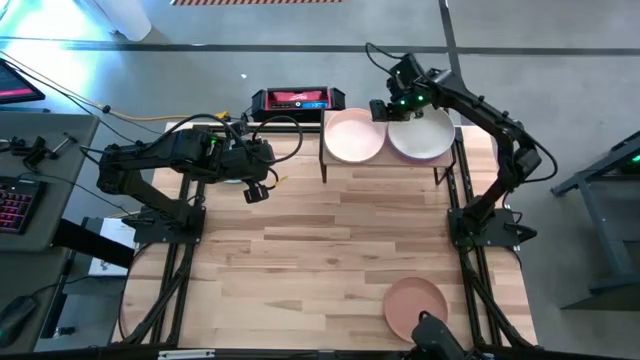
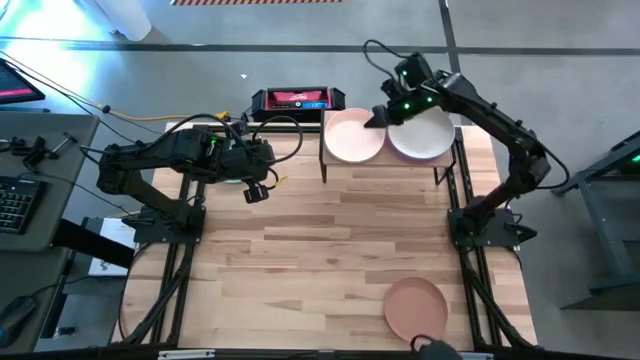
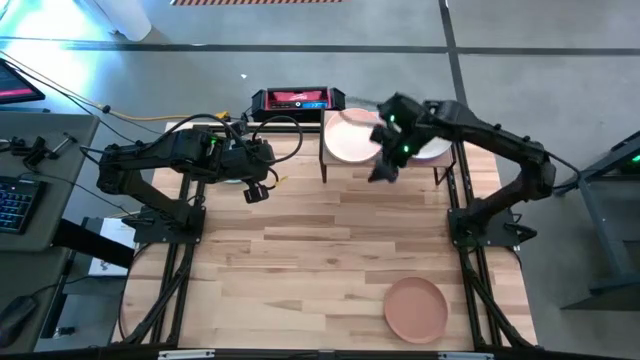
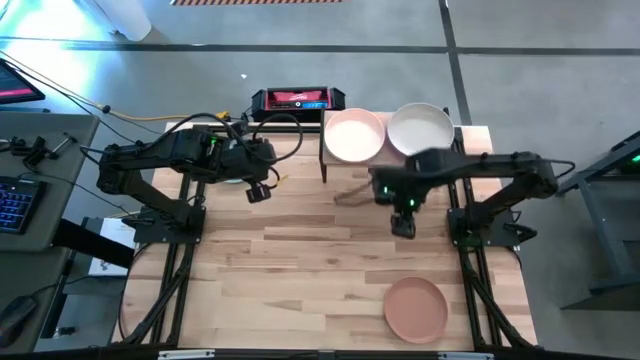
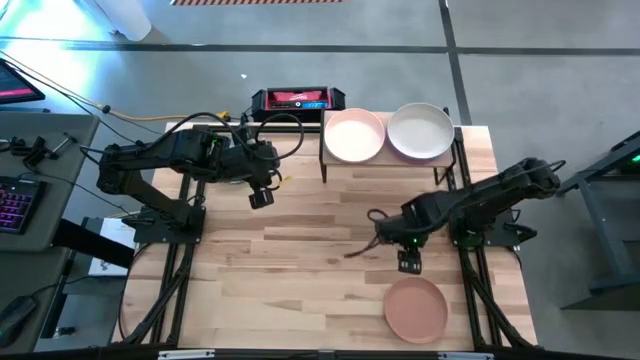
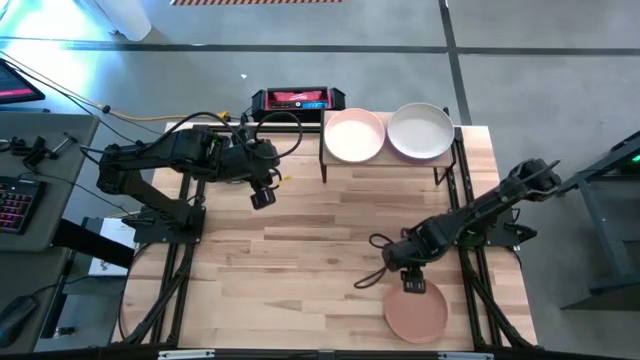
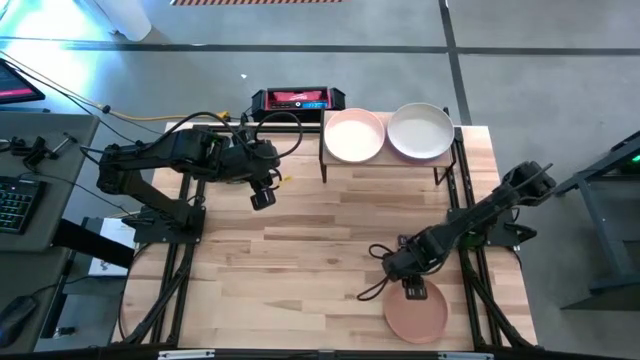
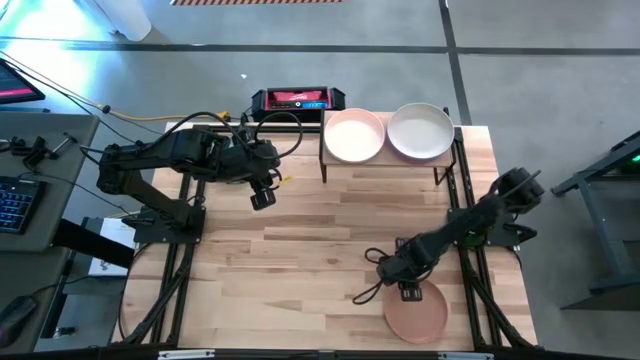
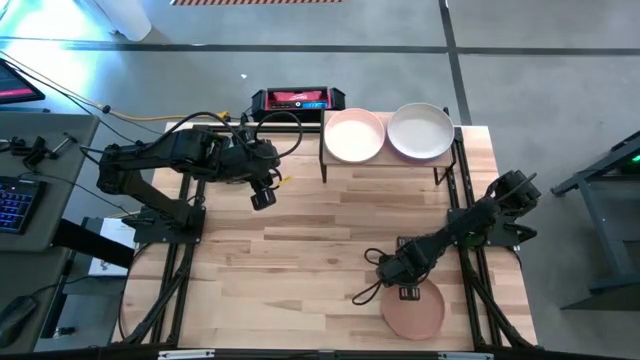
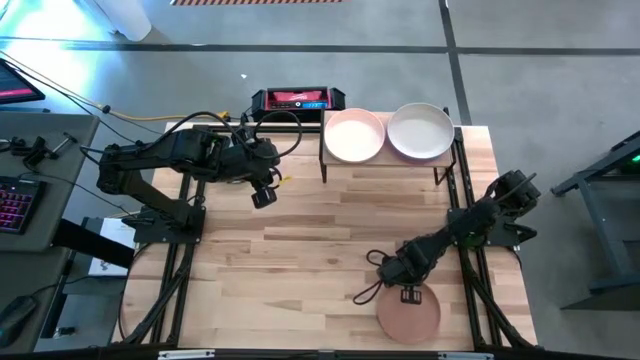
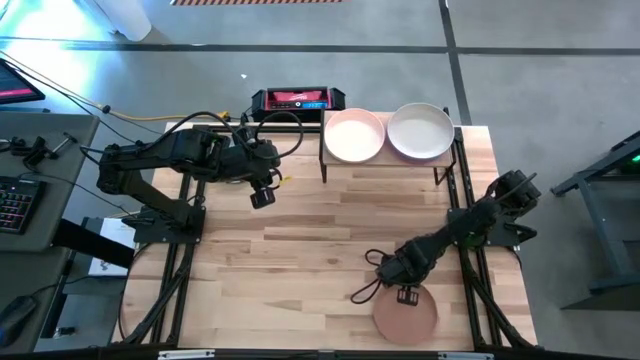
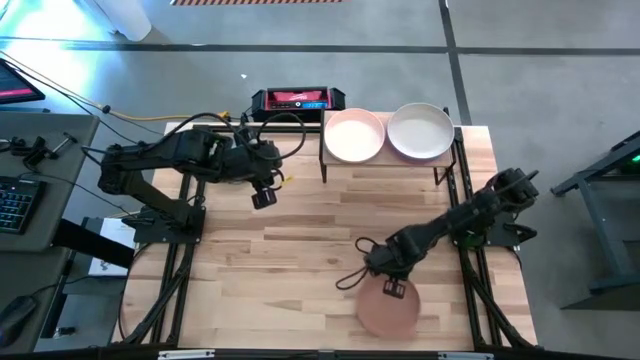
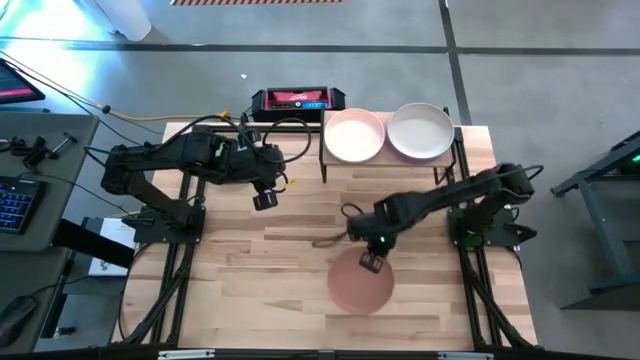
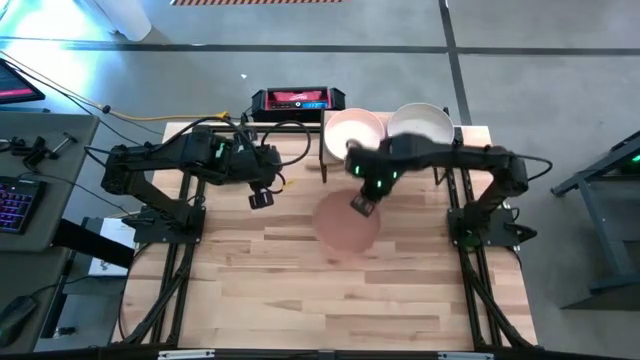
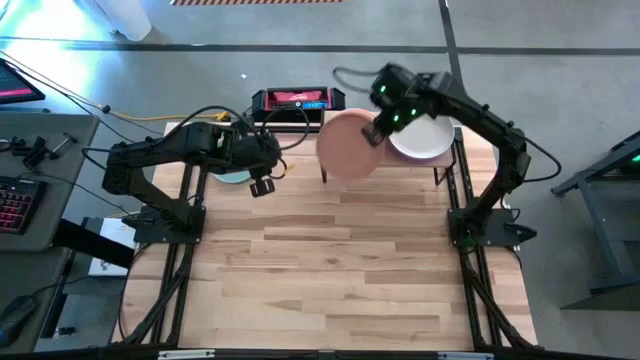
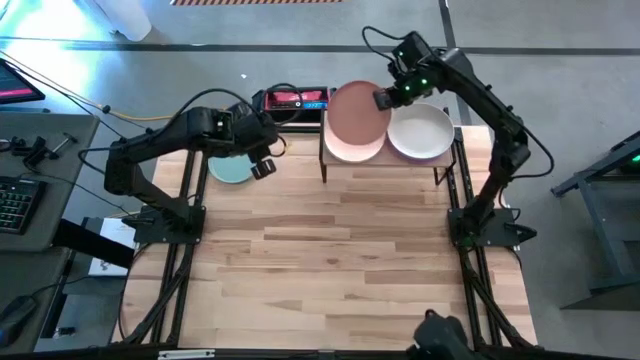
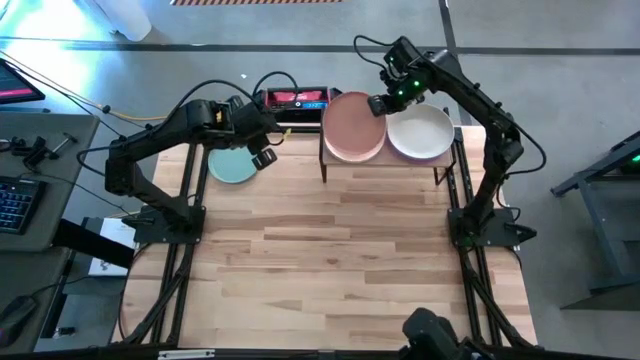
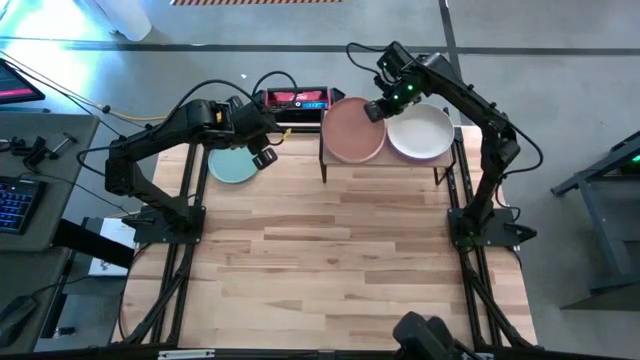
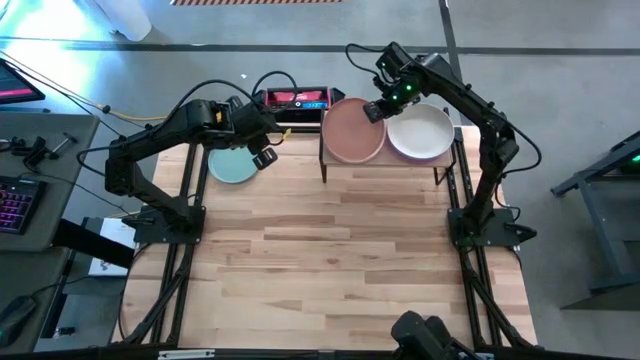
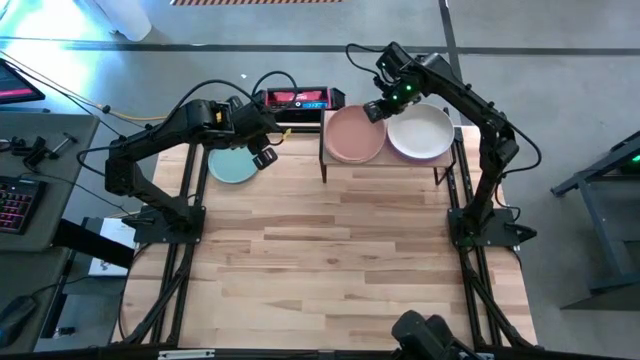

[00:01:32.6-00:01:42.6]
Task: Place and stack plates onto a shelf
Stack the brown plate on top of the white plate on the shelf

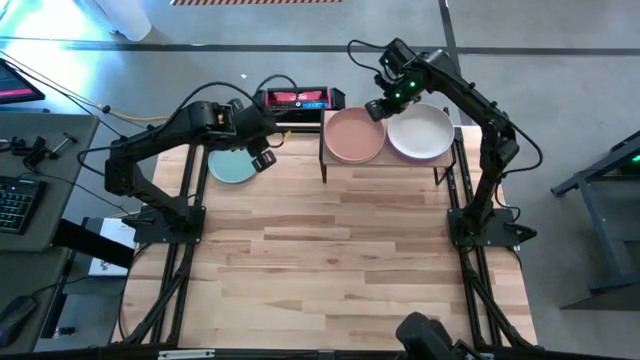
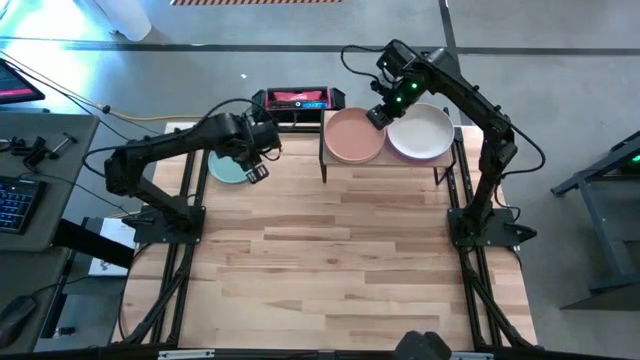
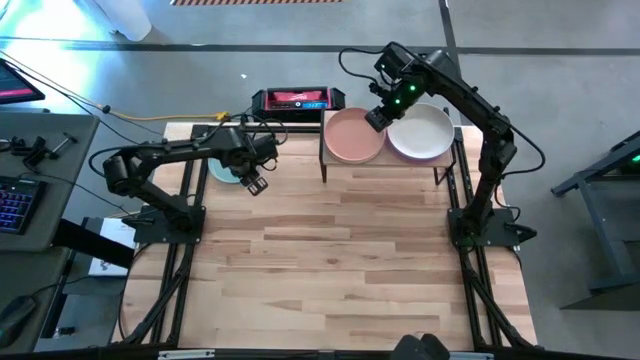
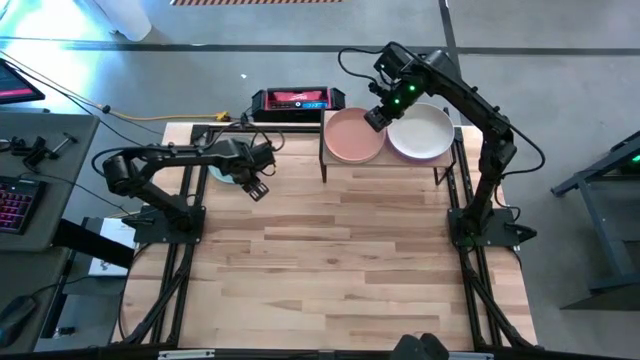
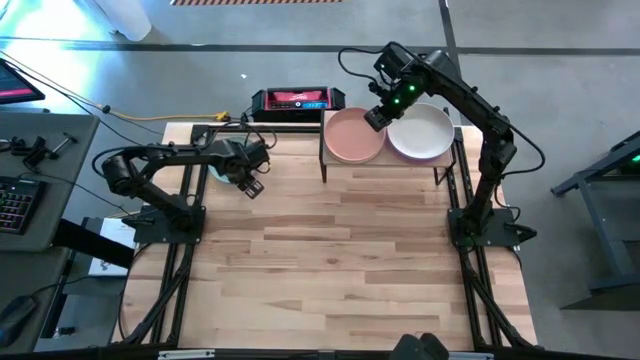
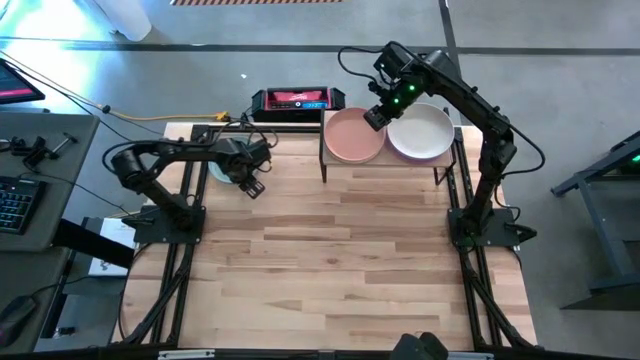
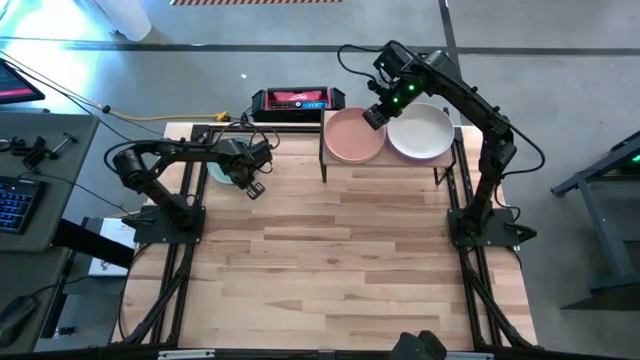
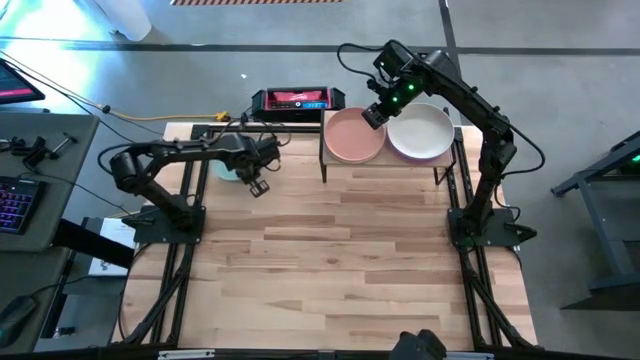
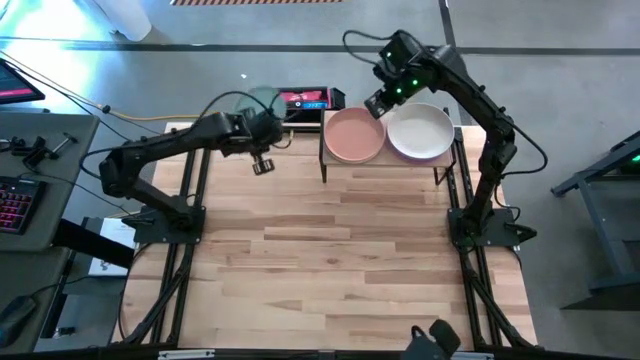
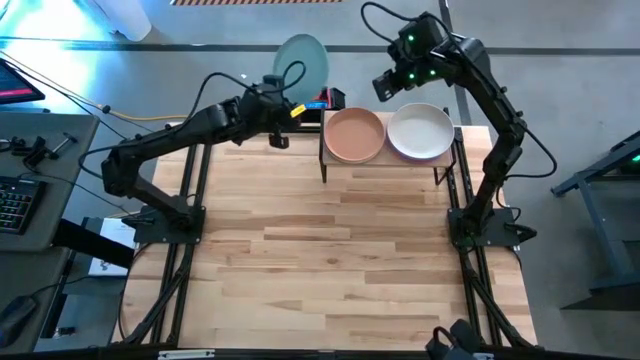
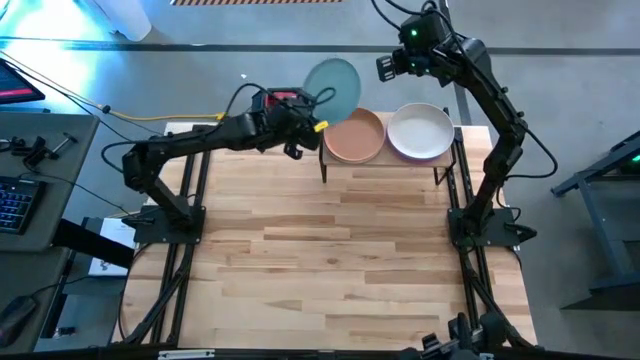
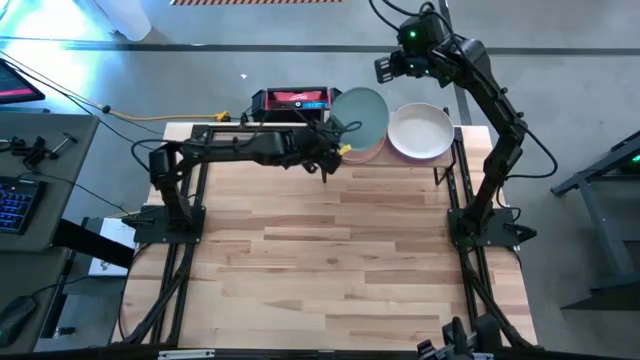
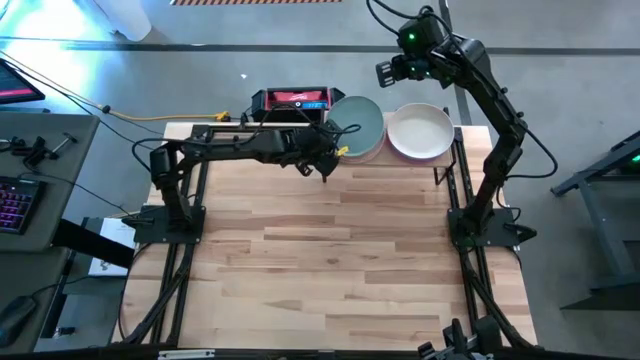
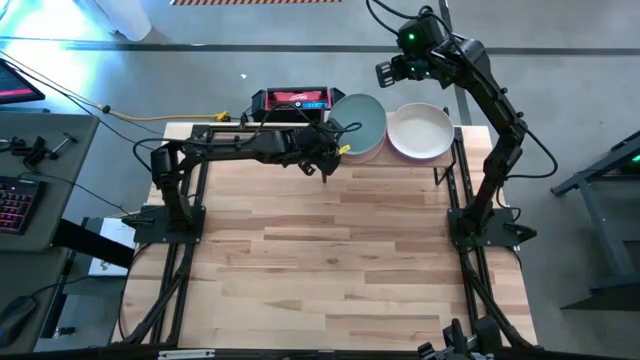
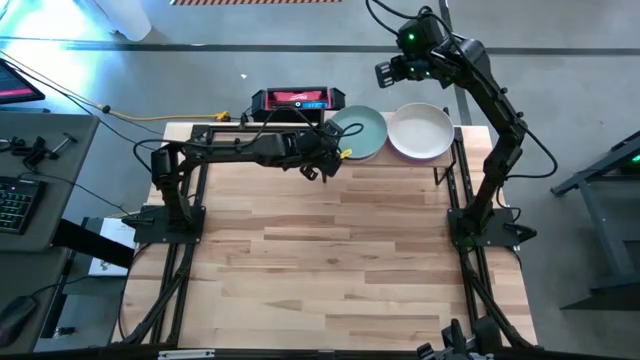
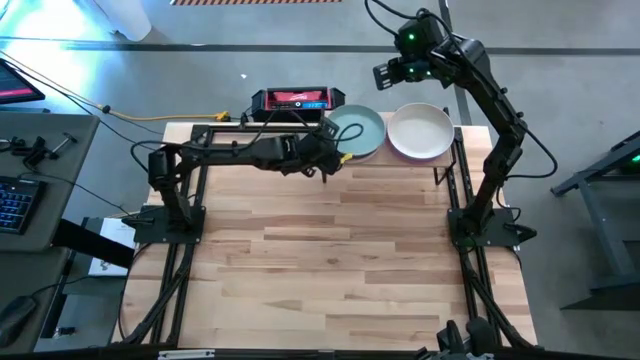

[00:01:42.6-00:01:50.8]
Stack the light blue plate on top of the brown plate on the shelf

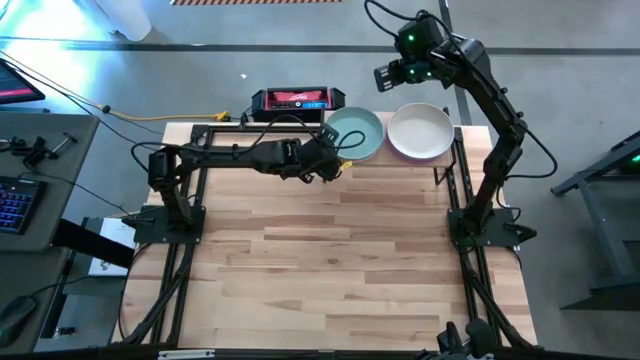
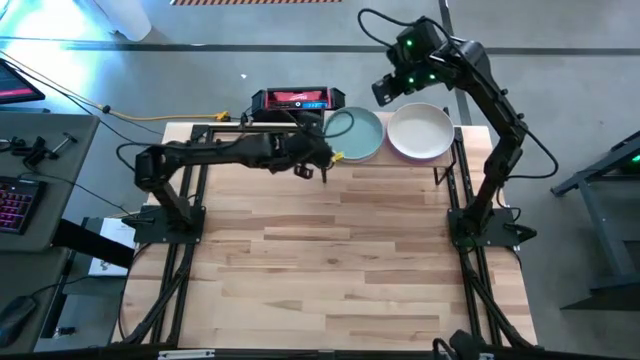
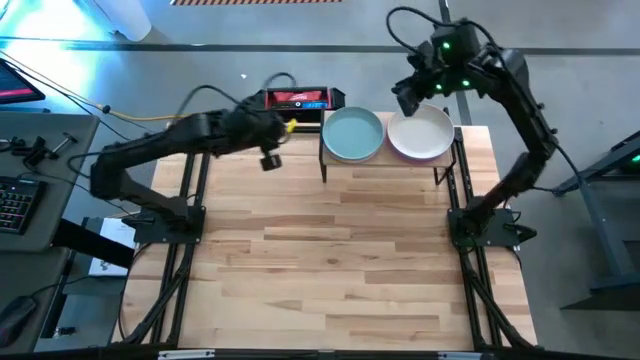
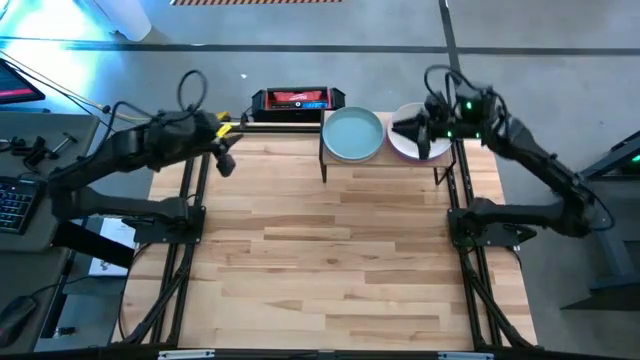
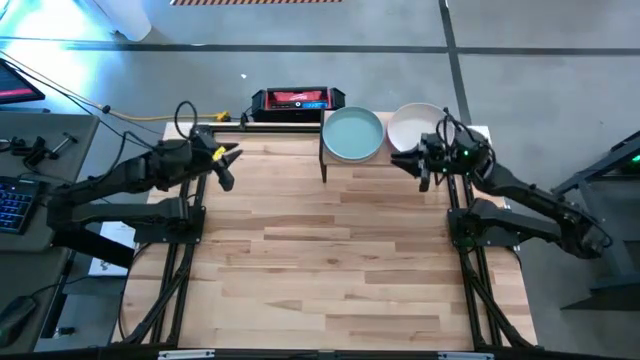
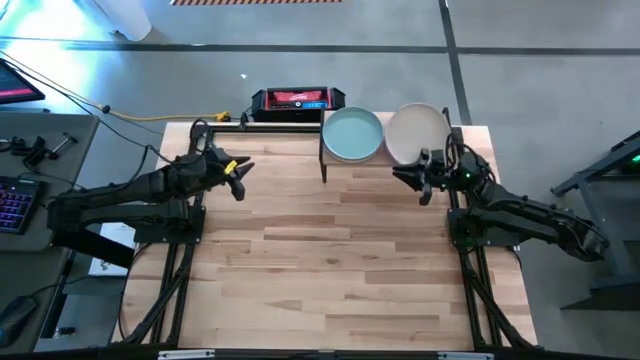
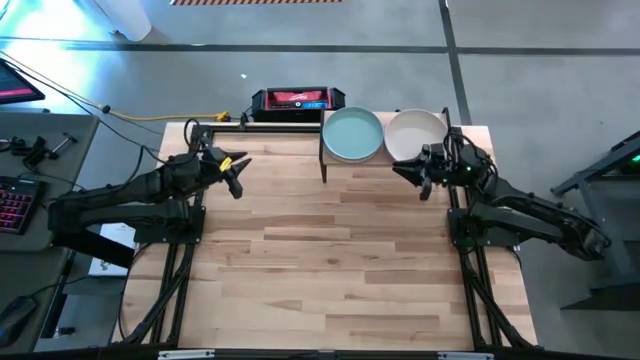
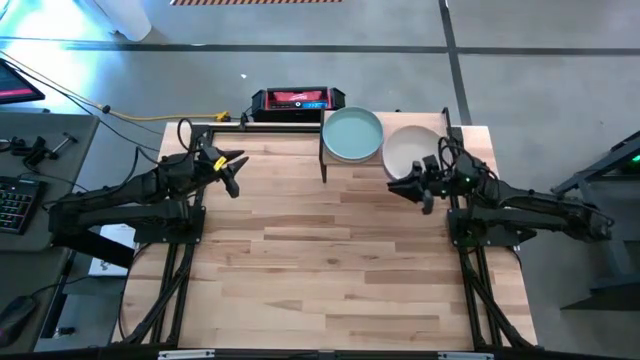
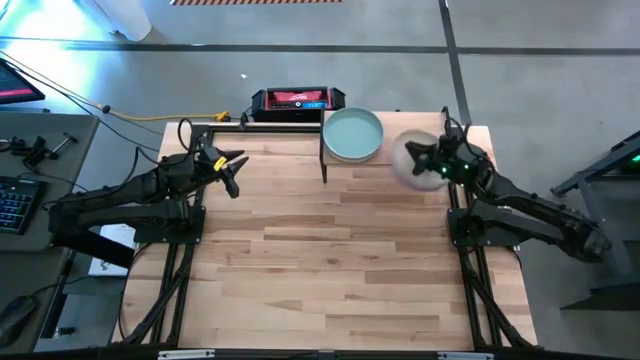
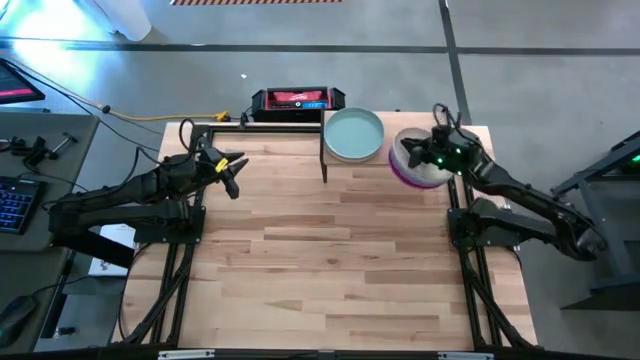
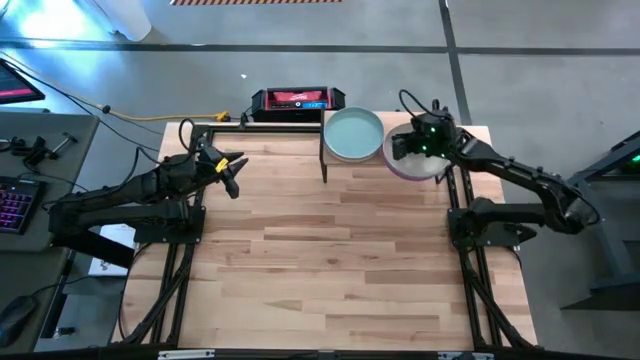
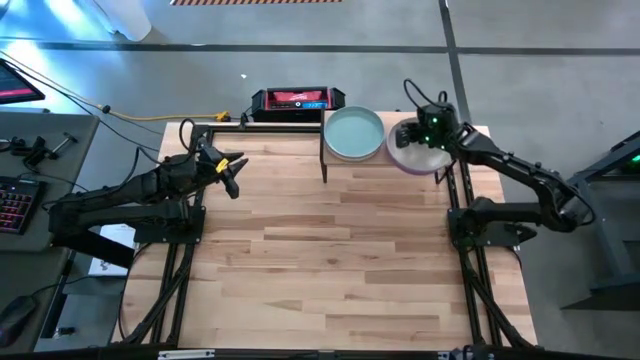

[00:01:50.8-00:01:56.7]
Return to Home Position
